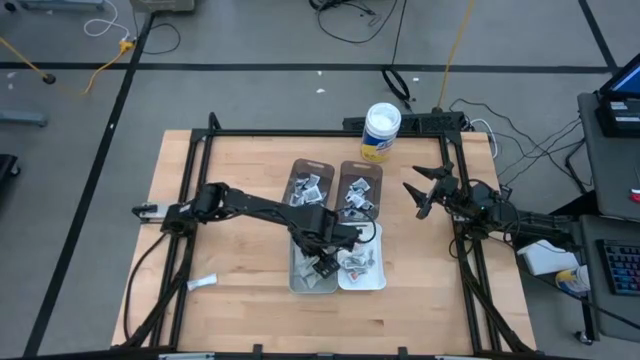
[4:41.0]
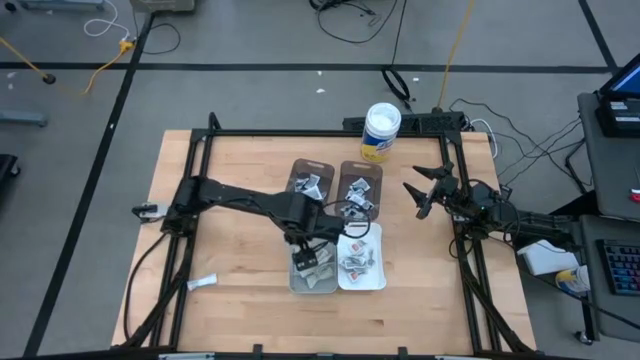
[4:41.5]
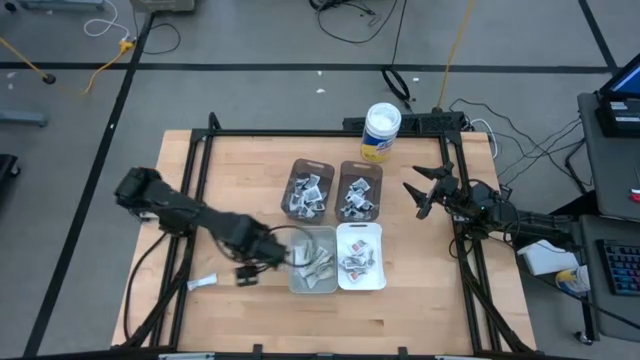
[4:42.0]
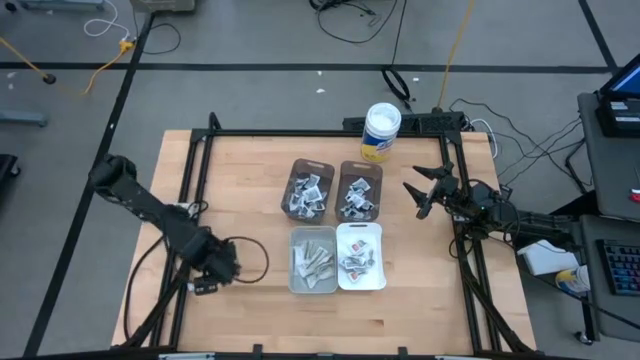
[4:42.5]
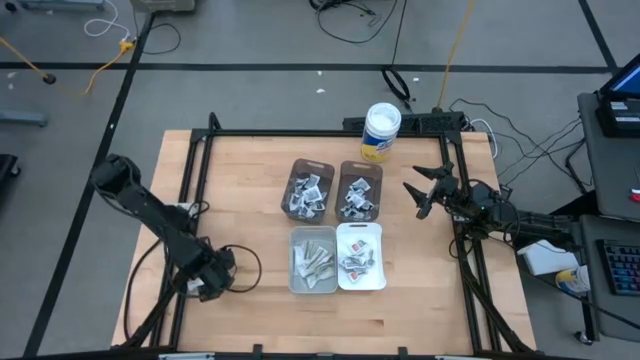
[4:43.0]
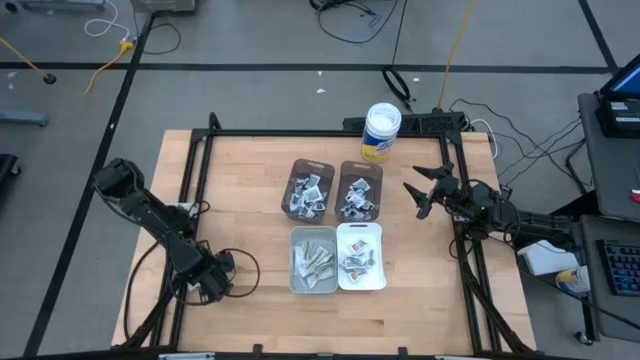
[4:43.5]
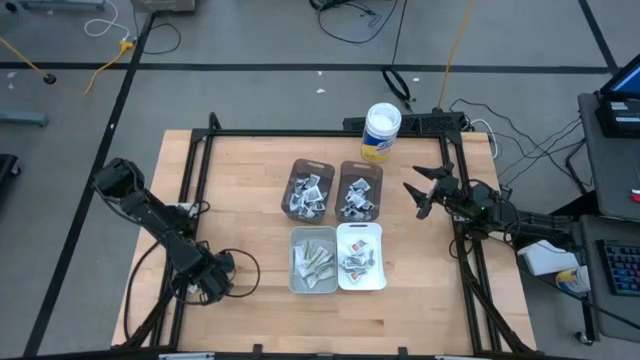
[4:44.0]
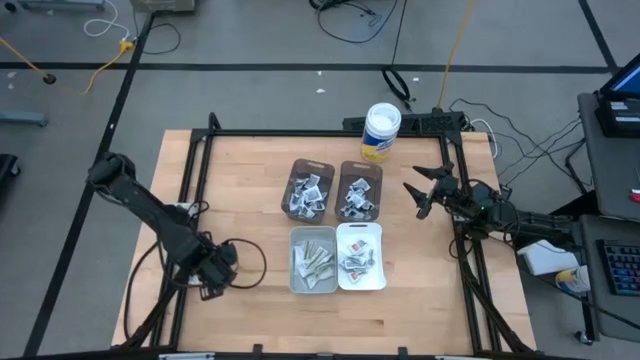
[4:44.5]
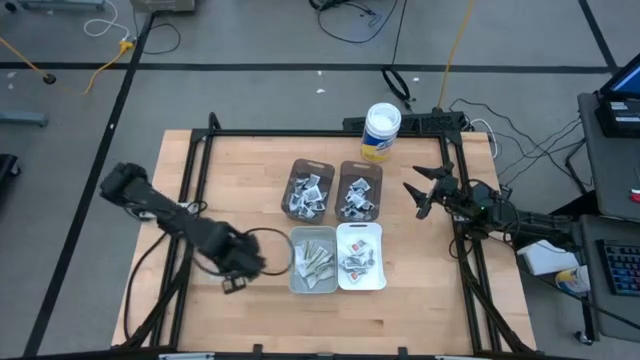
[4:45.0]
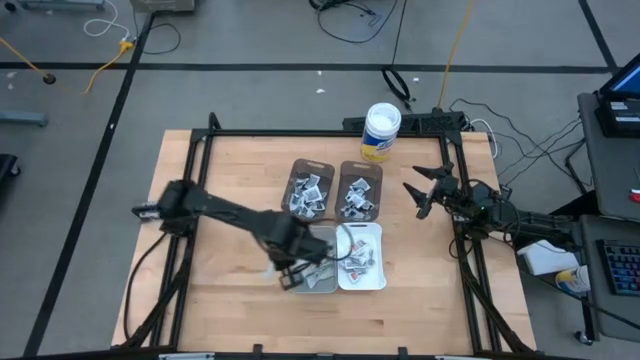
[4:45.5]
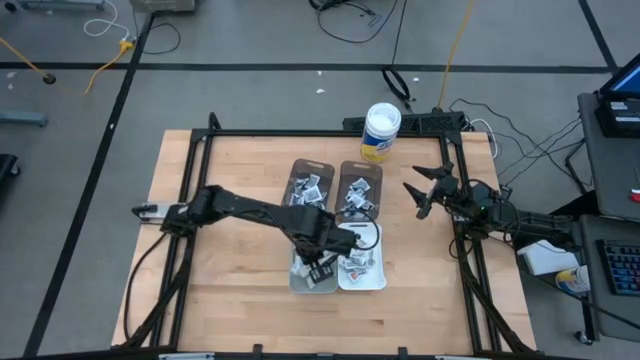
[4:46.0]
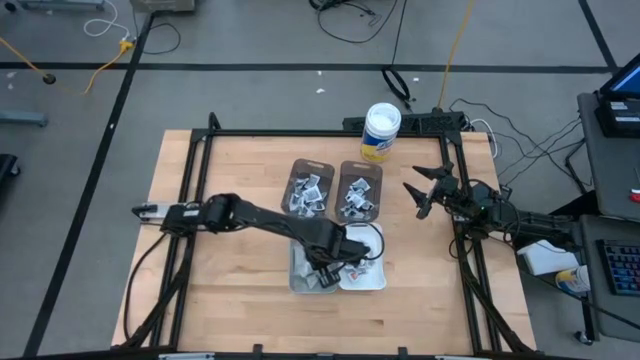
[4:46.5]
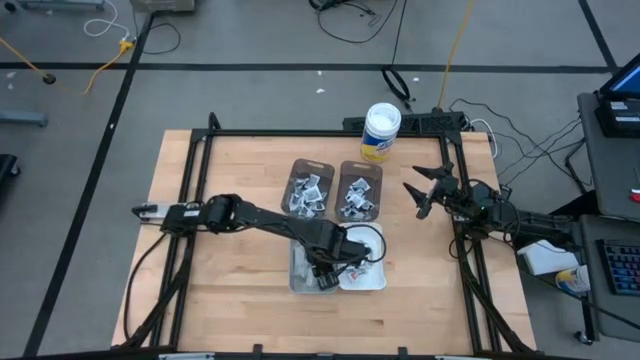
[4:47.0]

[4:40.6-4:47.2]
Task: Pick & Place First Aid Supplies
Put the green pad into the gray bin

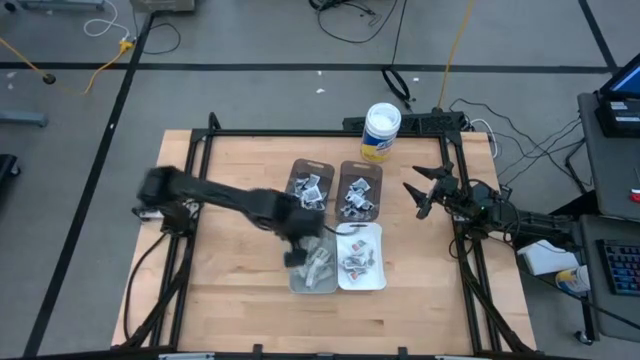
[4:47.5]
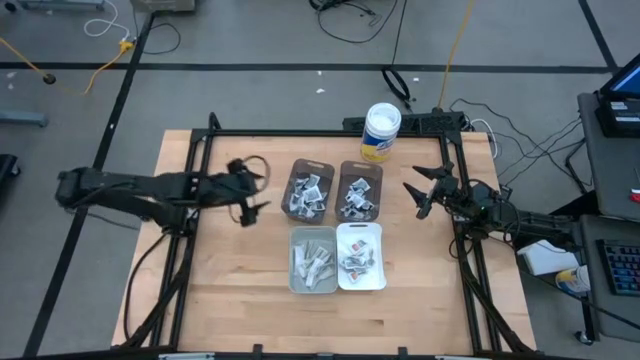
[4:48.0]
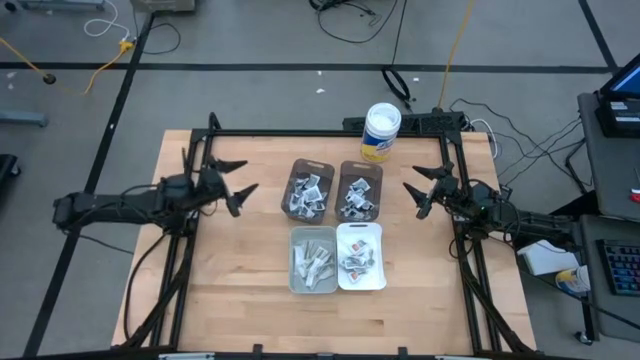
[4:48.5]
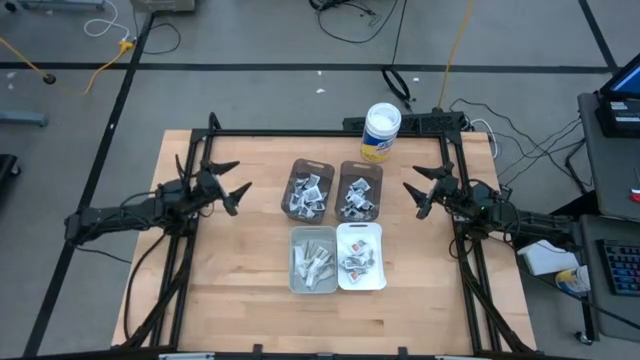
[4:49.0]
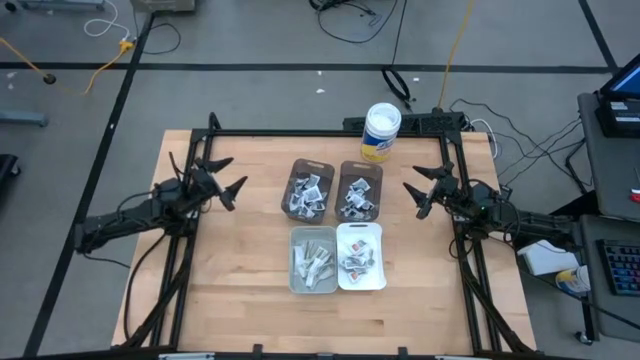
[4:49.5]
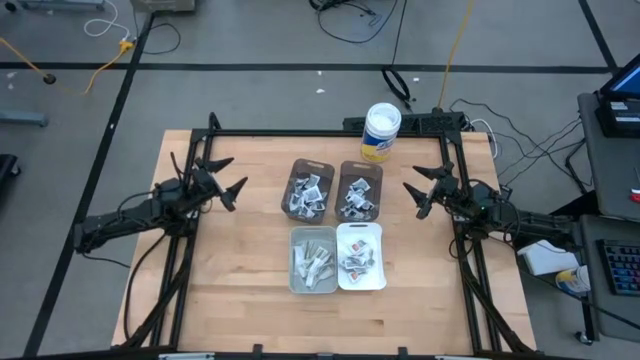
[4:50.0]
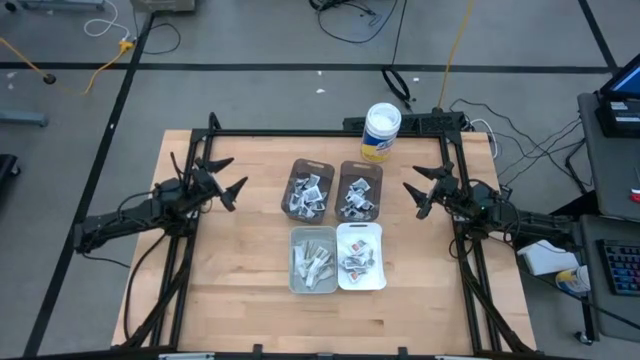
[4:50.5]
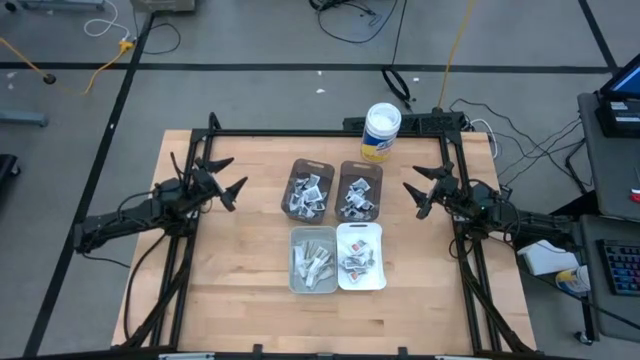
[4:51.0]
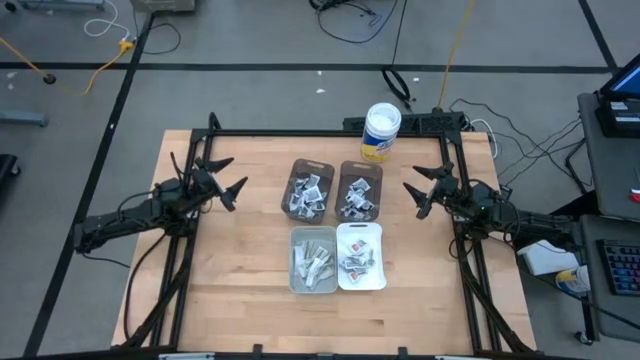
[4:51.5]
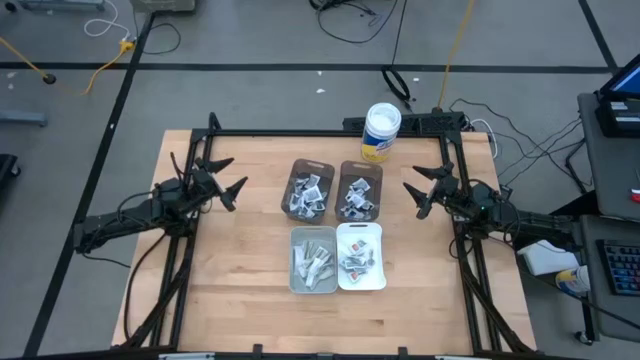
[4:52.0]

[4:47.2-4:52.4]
Return to Home Position

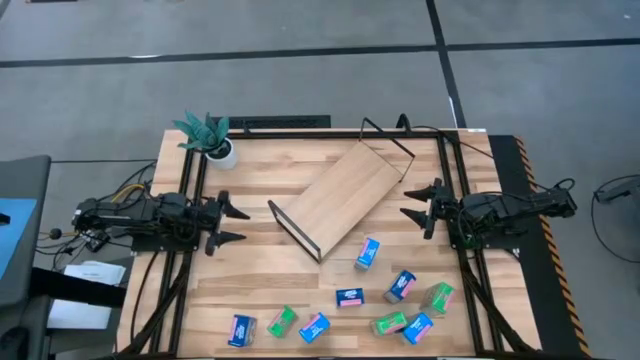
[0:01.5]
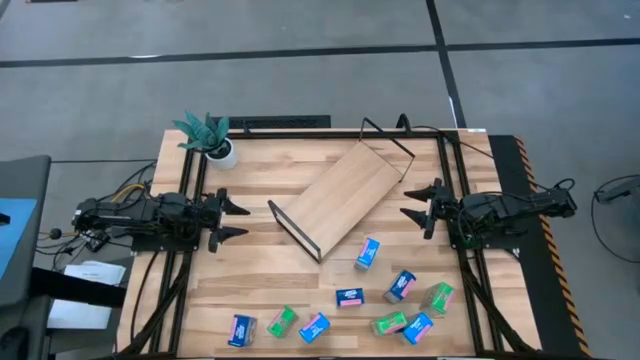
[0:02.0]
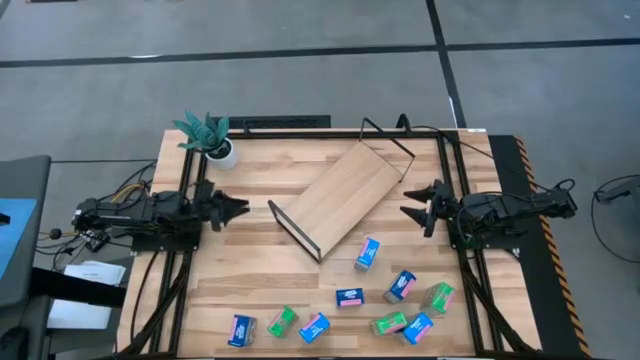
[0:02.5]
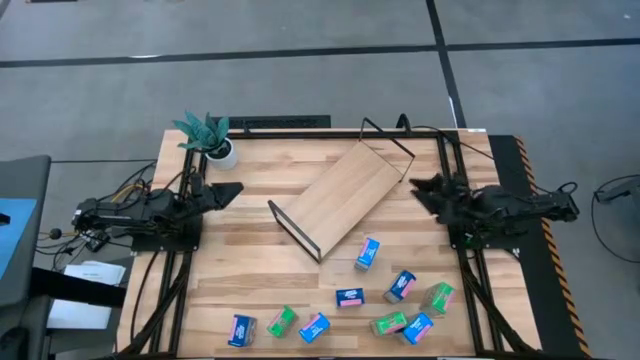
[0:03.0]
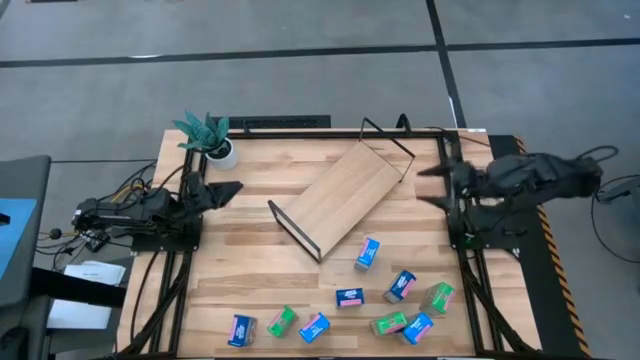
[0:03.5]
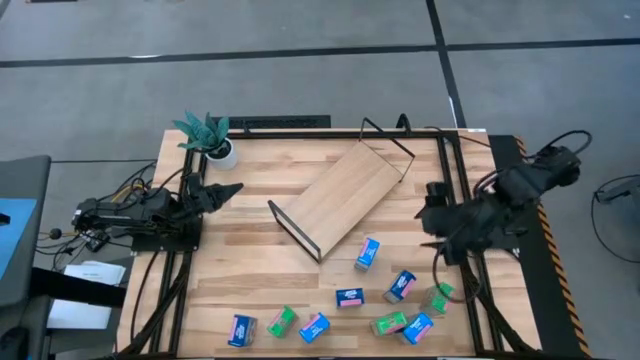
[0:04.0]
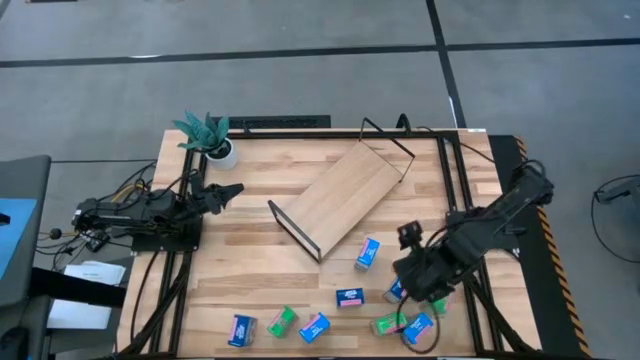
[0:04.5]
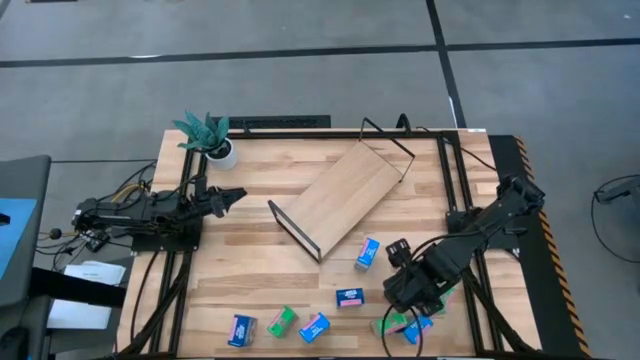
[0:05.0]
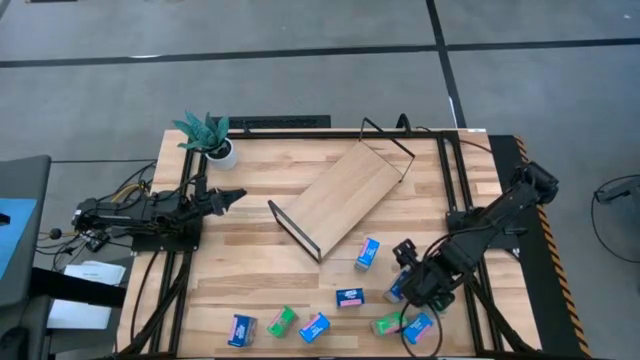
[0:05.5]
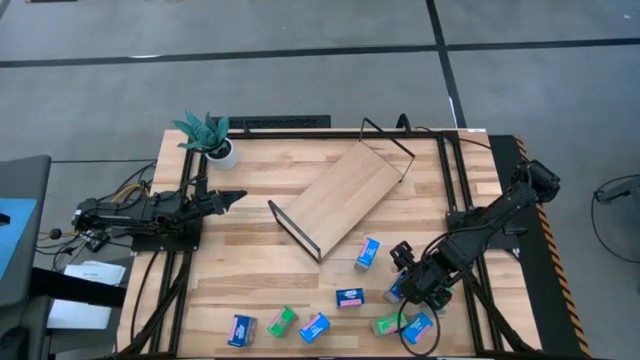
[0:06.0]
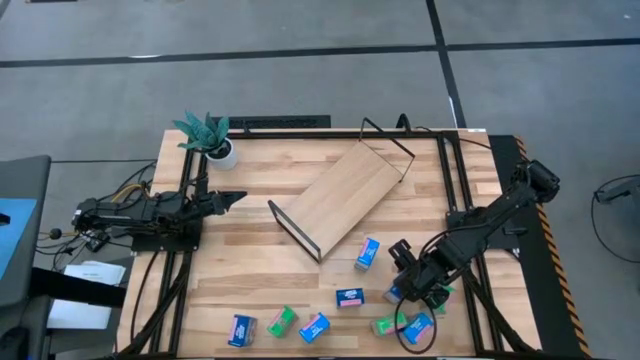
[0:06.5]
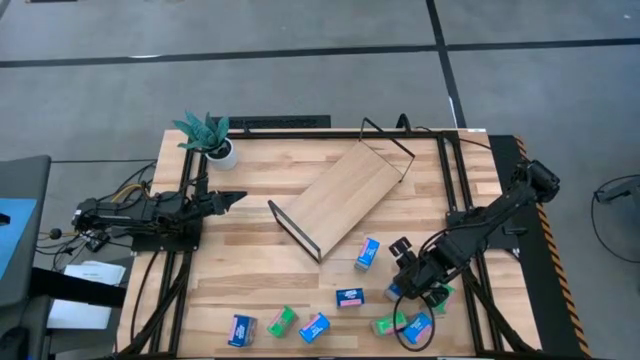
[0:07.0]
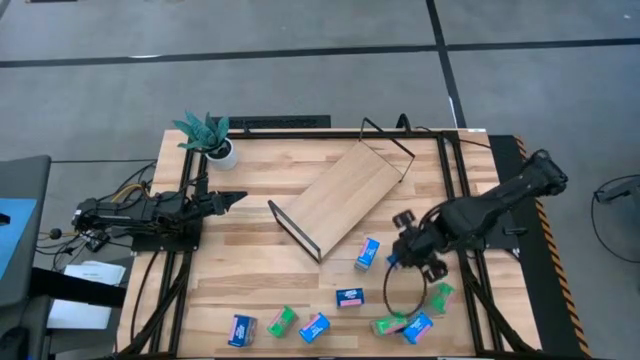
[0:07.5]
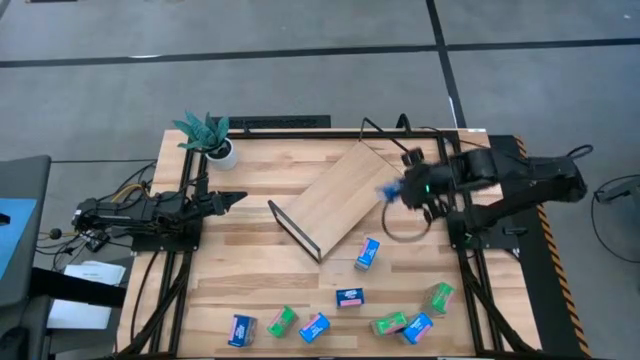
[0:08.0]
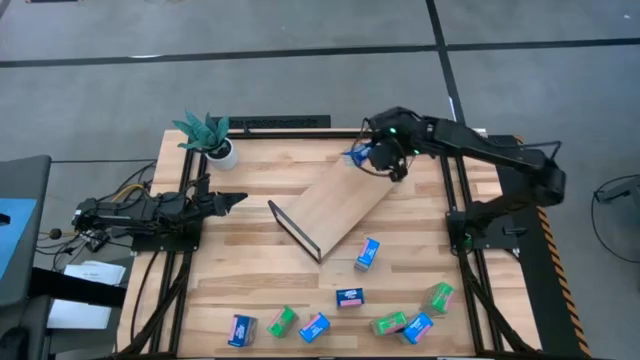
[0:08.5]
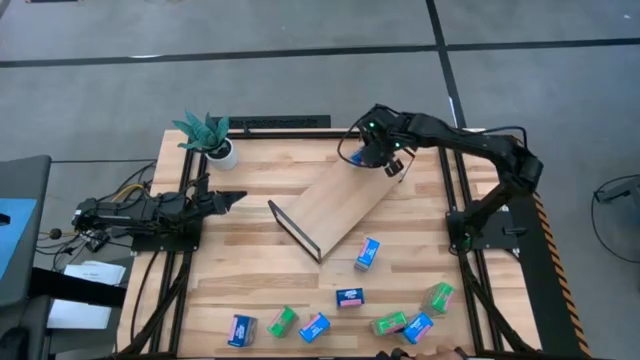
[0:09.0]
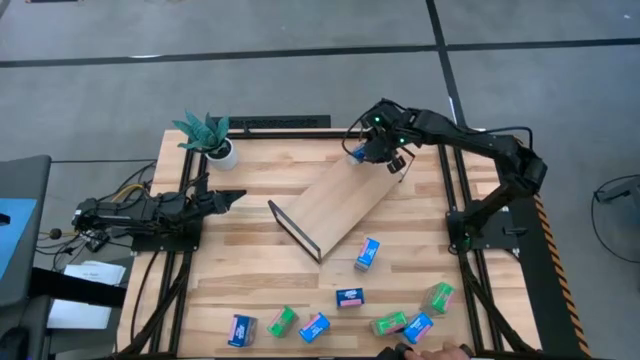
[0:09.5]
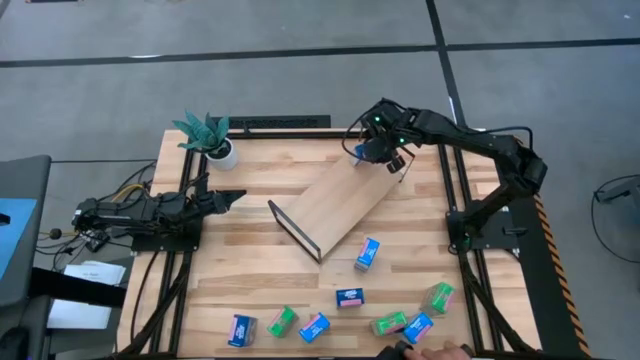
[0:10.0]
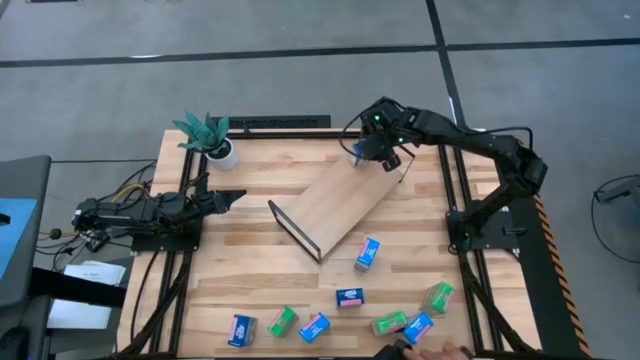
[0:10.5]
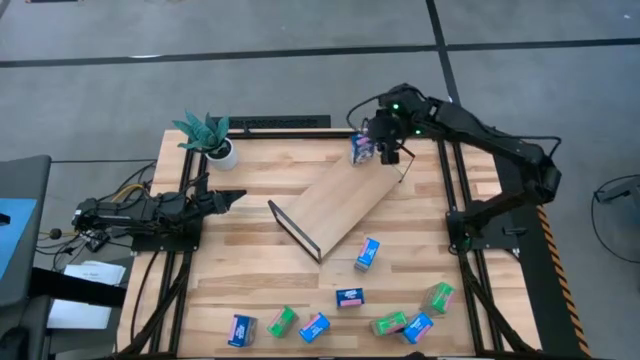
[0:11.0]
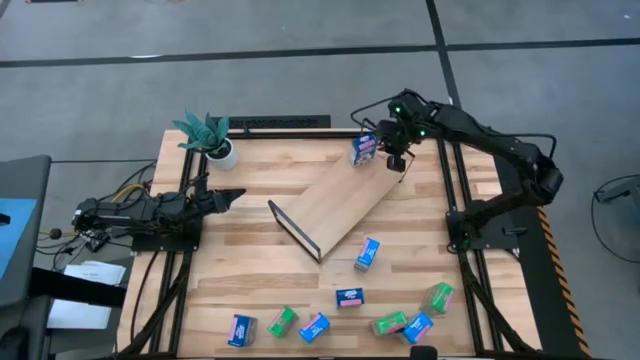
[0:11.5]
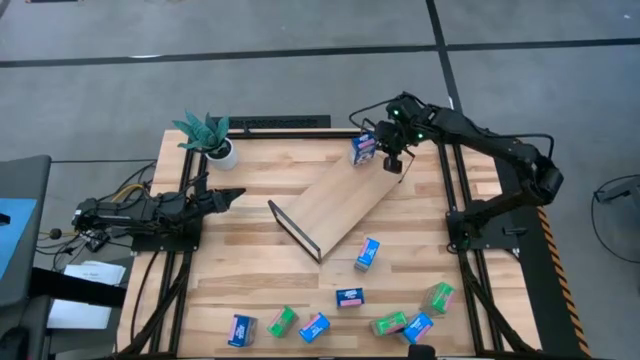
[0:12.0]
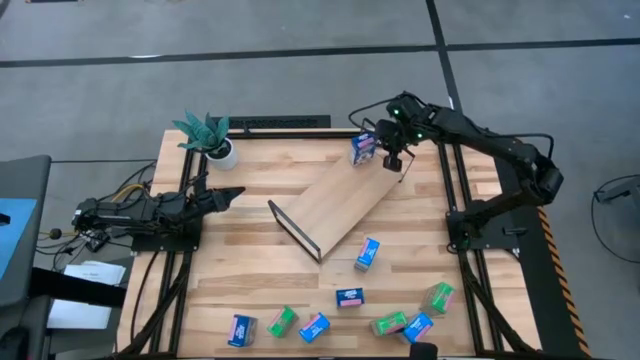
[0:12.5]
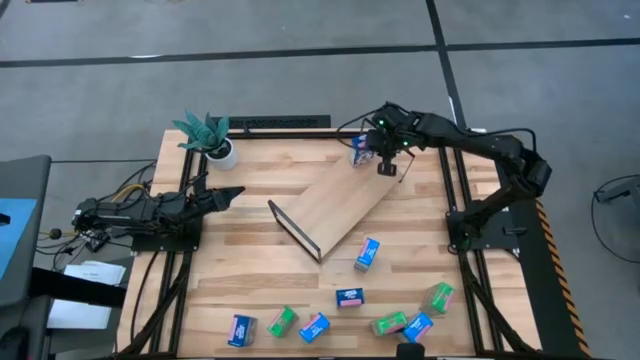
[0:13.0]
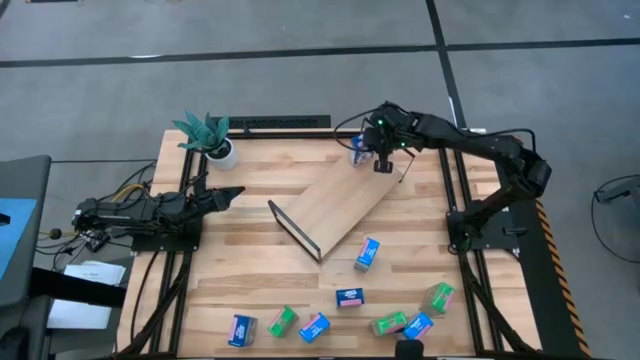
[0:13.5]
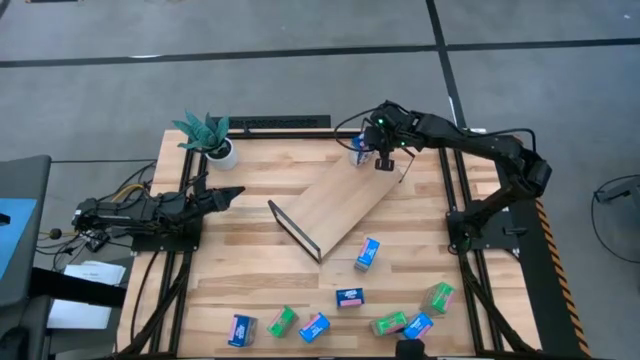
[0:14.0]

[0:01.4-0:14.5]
Task: Stack cereal on shelf
Put the top right blue cereal box on the shelf
